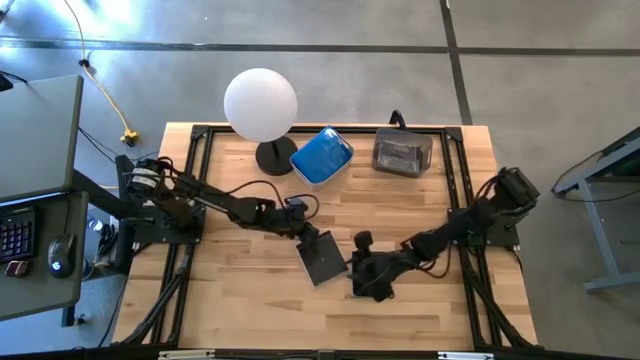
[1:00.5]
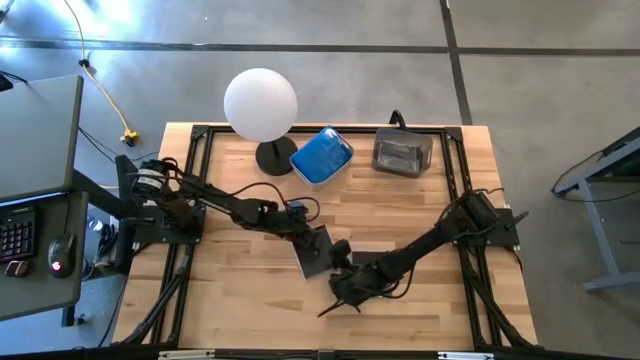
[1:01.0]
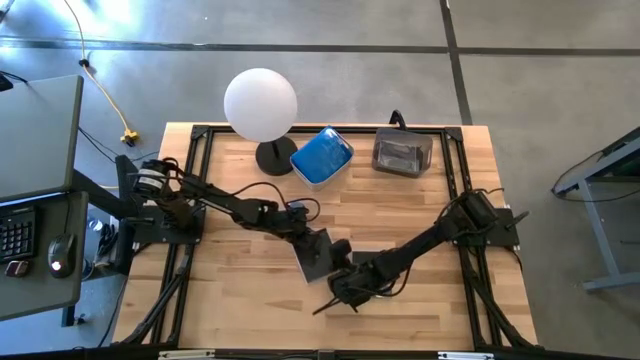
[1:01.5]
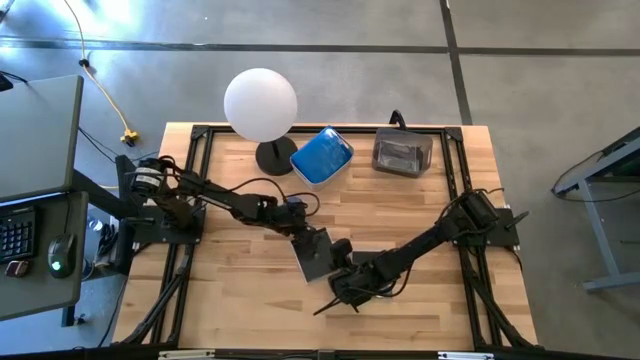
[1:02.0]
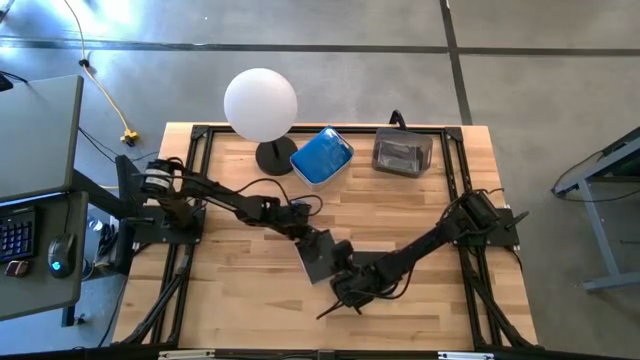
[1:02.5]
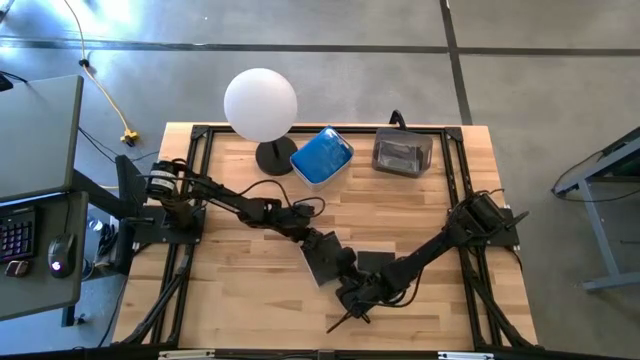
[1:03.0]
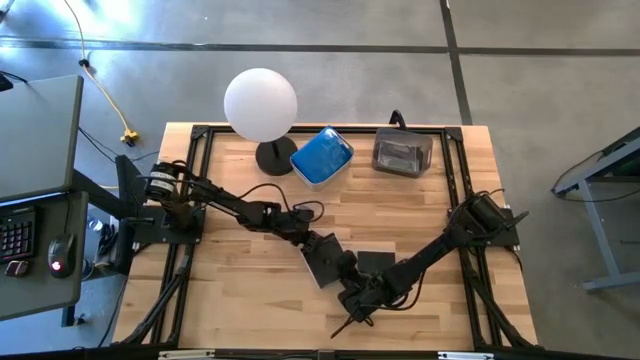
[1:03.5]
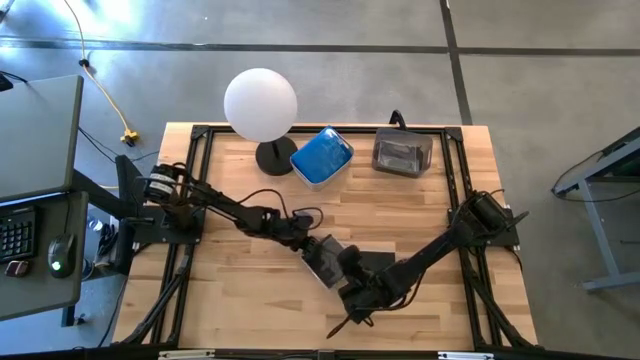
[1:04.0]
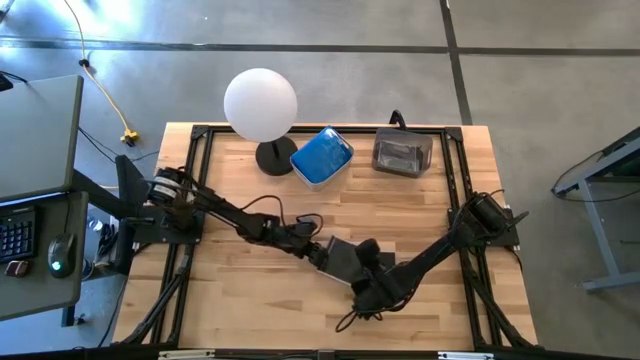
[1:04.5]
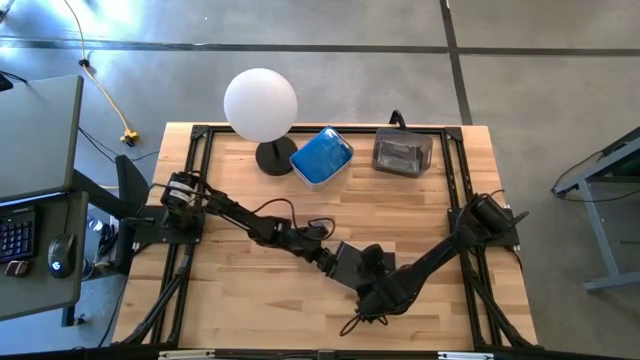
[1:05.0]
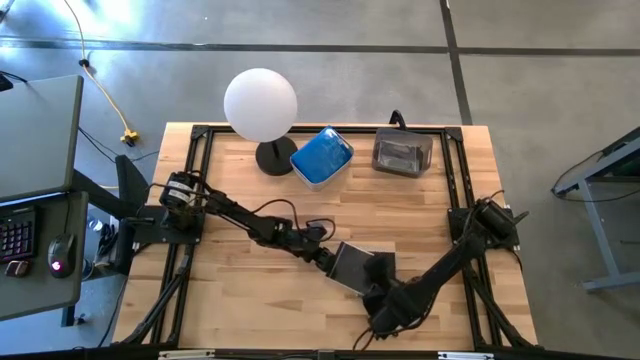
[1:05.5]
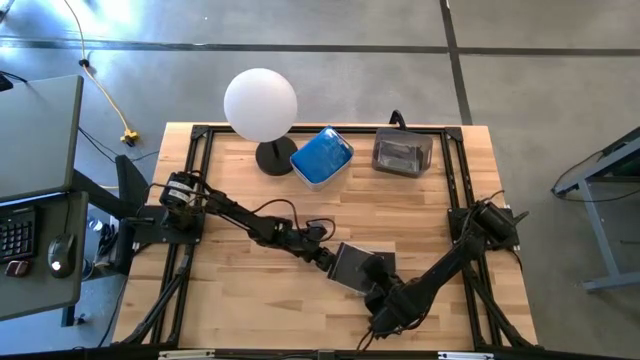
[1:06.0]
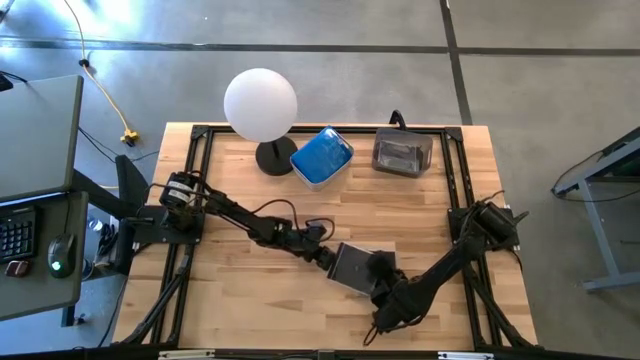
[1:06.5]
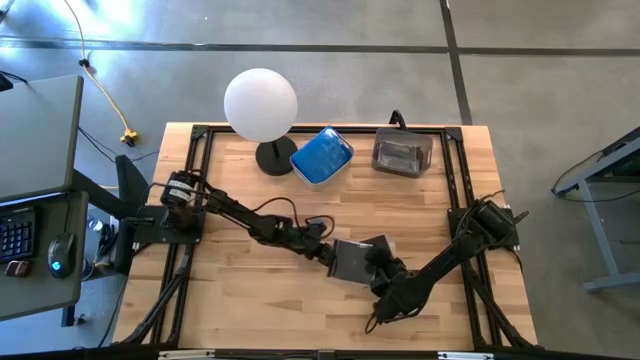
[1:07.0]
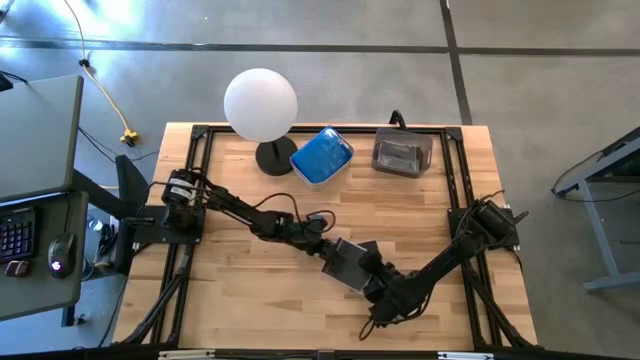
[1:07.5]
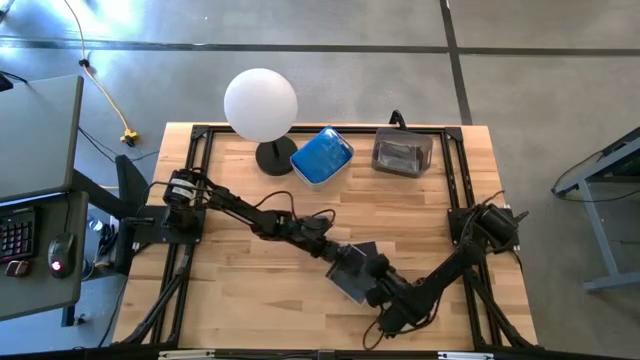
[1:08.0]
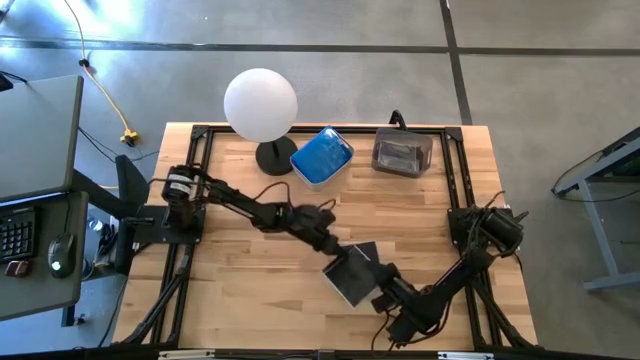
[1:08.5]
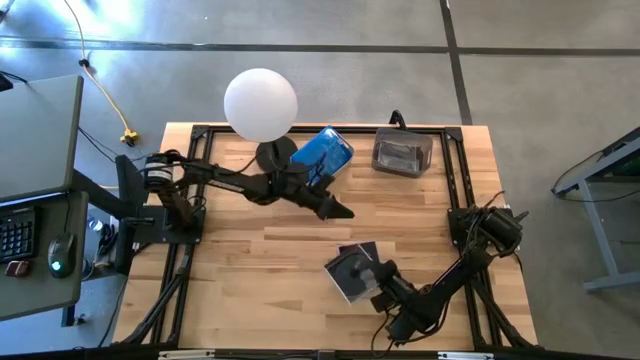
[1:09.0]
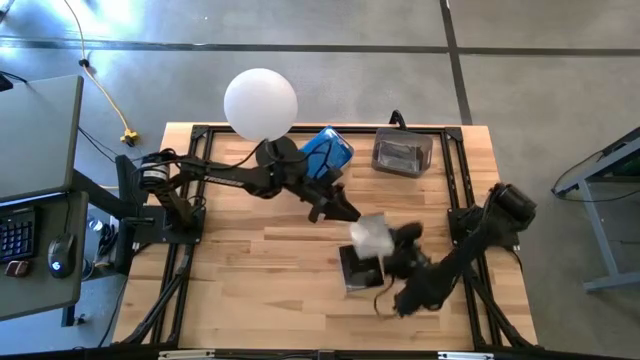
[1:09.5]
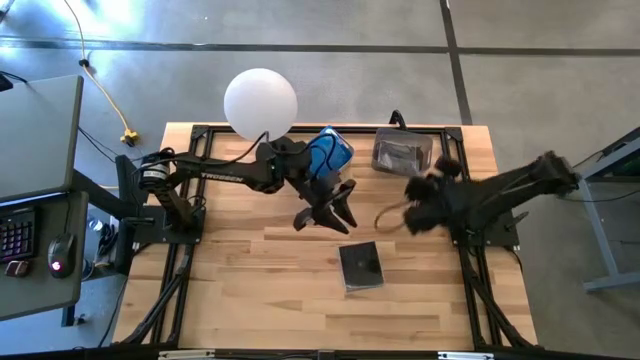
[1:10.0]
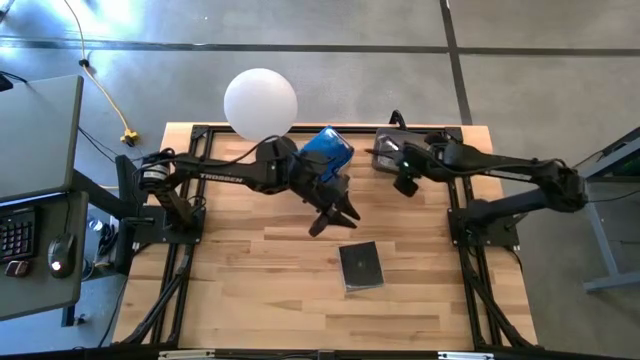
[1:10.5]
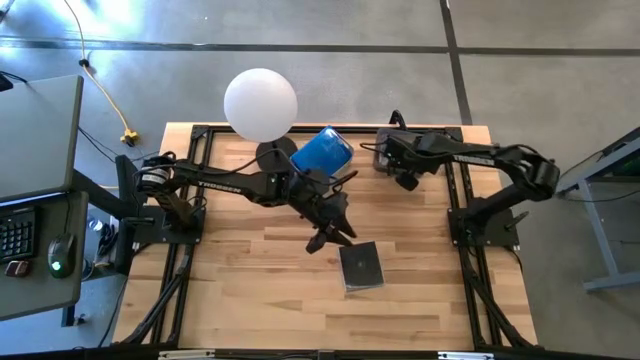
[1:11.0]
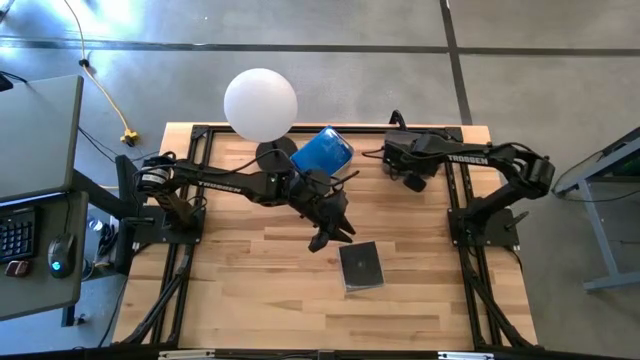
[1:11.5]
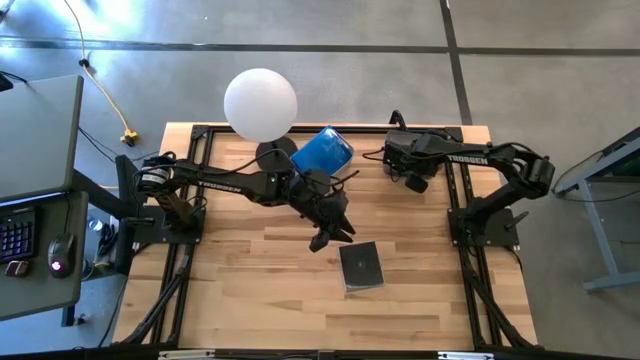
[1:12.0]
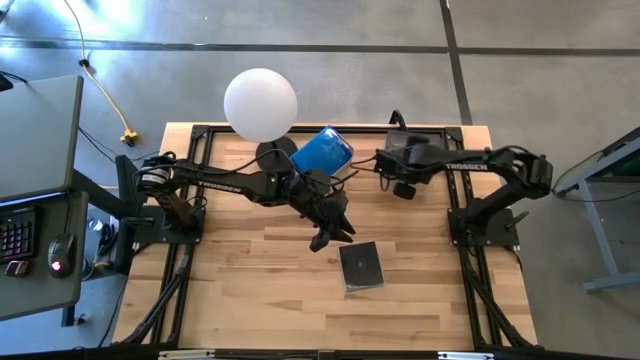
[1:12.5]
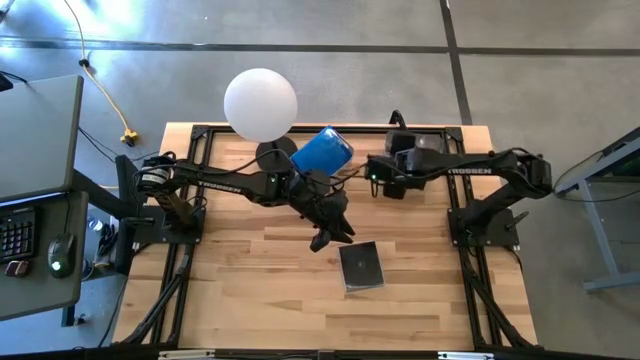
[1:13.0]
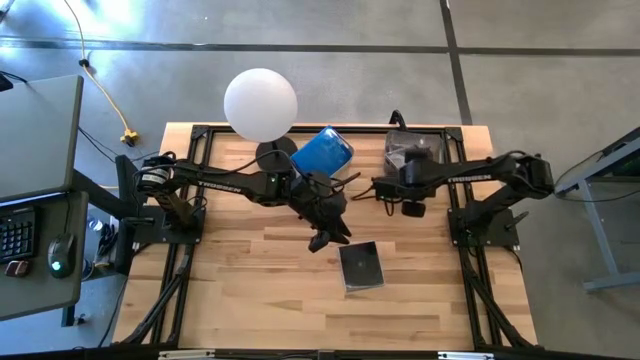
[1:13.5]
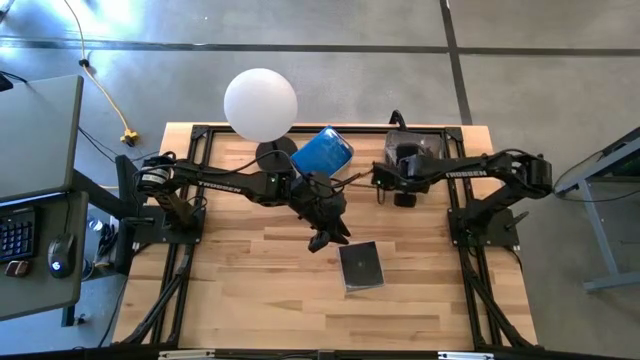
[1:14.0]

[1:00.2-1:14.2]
Task: Pick & place jewel cases by type
Put the left black CD case into the black bin

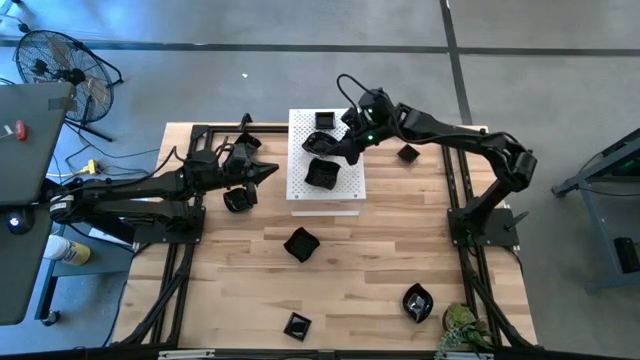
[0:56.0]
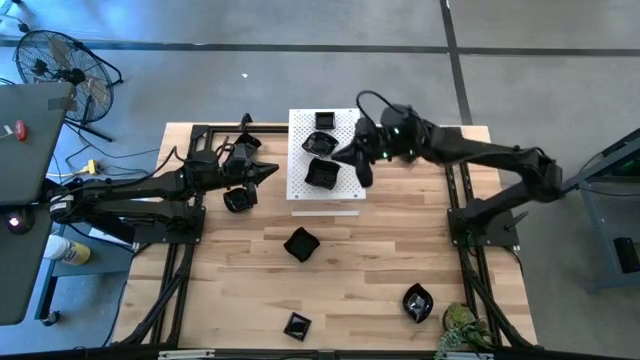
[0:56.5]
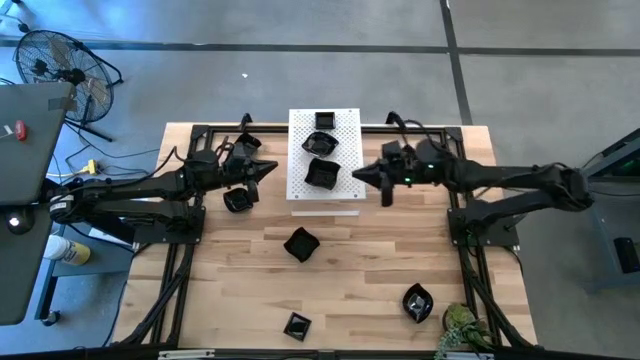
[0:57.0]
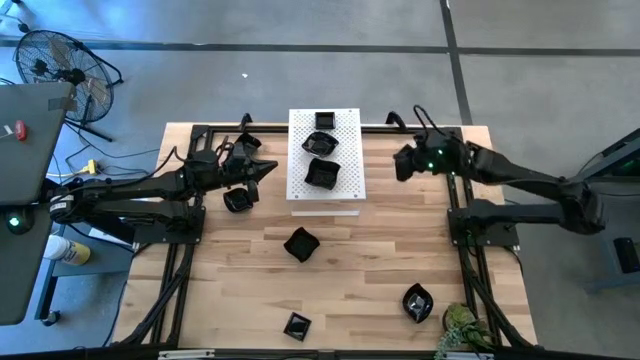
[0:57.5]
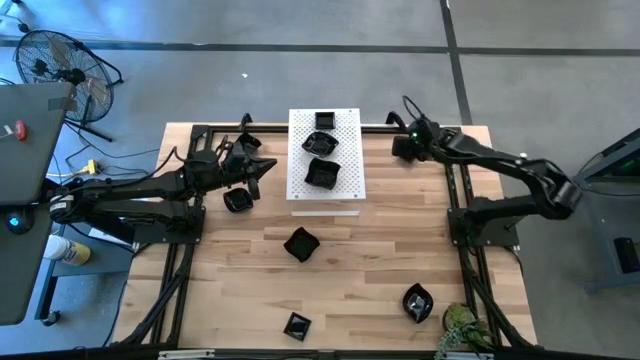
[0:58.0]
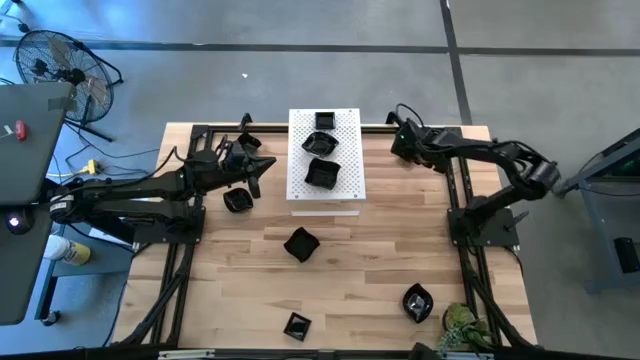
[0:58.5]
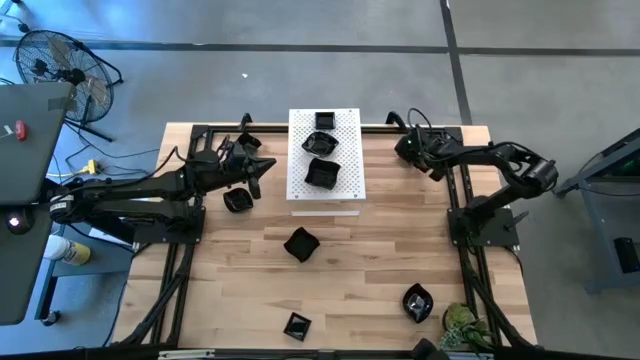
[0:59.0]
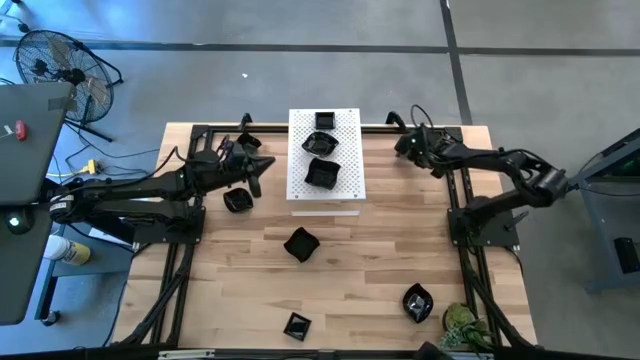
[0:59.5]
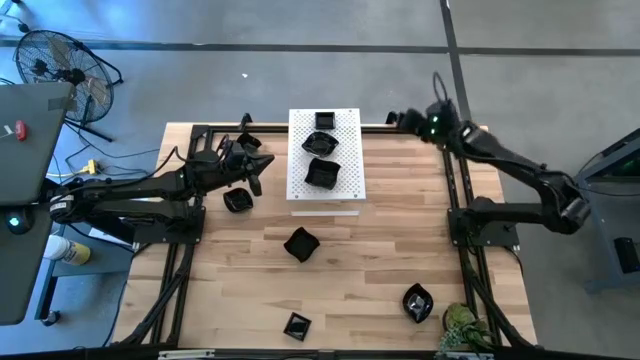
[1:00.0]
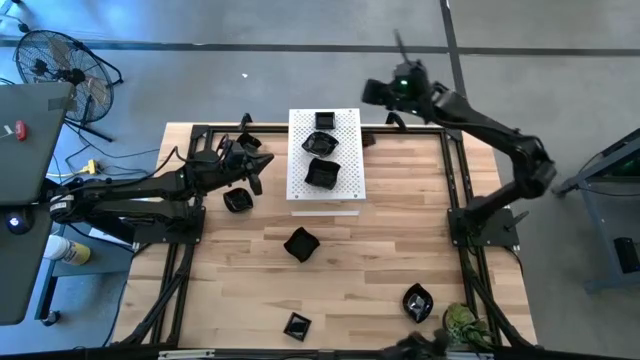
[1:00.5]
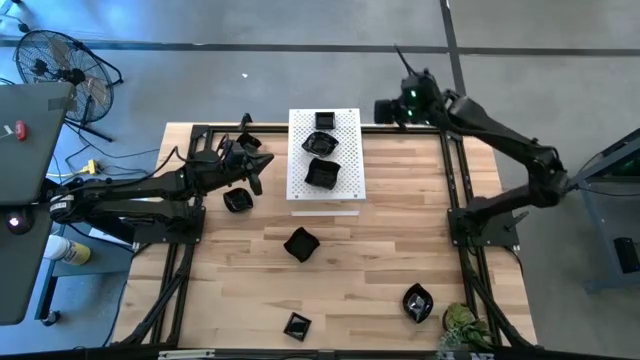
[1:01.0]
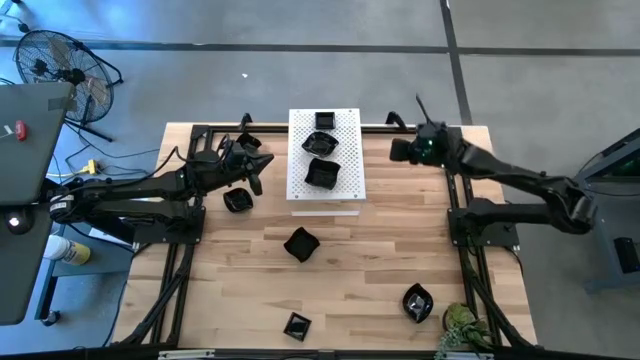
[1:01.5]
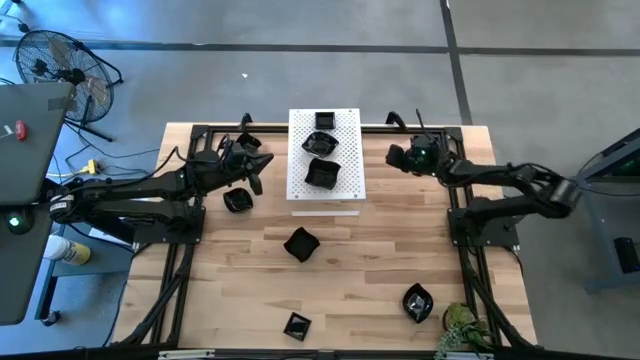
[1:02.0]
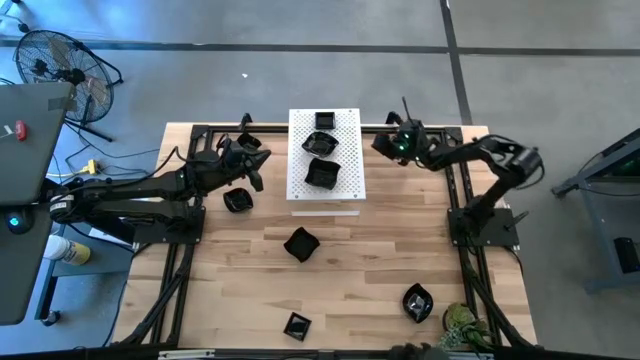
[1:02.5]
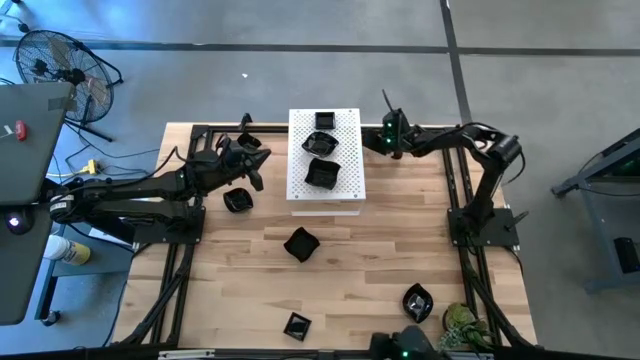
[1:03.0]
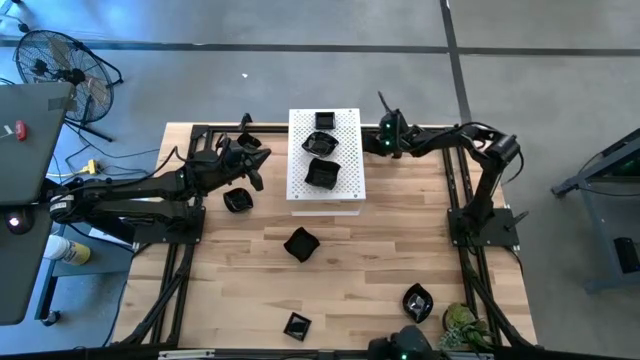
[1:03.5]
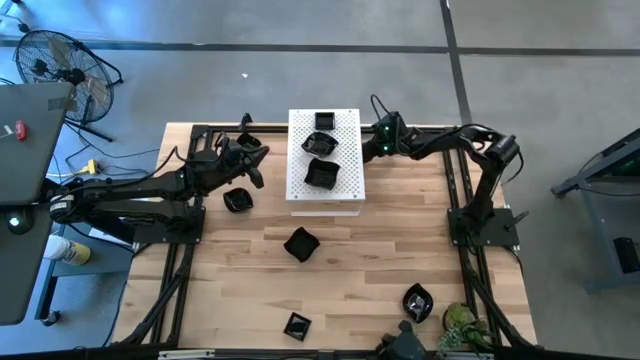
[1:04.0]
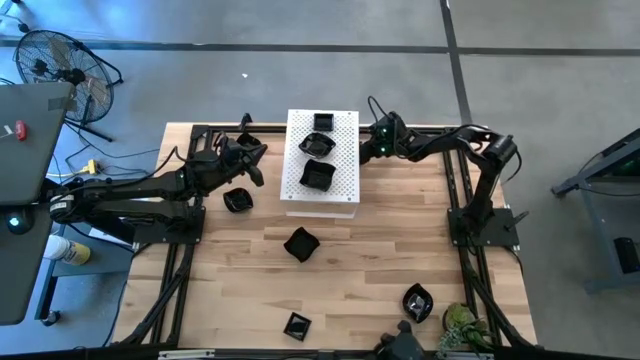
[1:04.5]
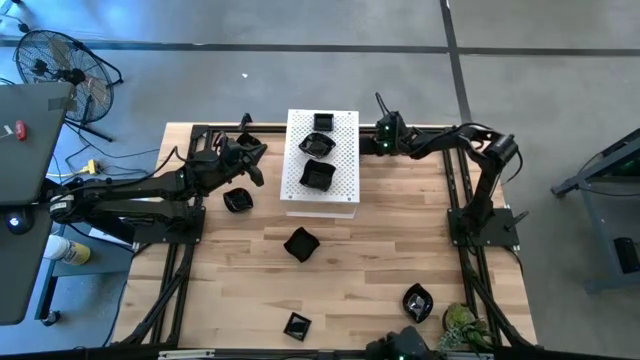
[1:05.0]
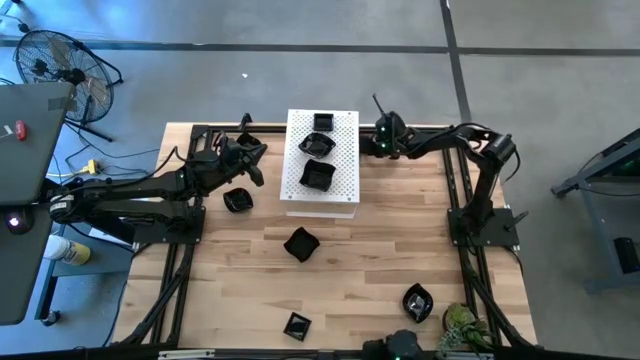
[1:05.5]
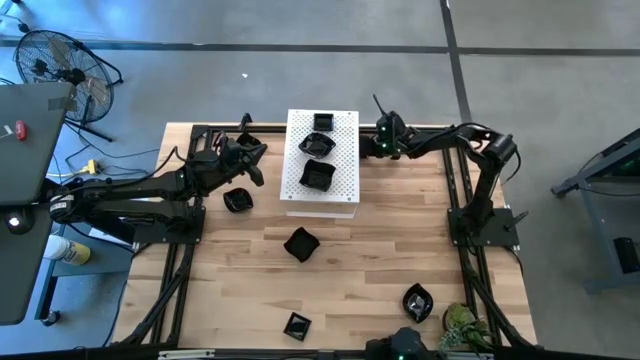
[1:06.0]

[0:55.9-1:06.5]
Task: Pick & Place Mini shaped plates
Stack the square plate on top of the square plate on the shelf
